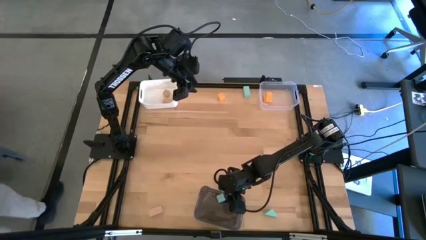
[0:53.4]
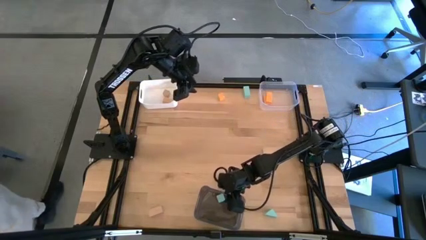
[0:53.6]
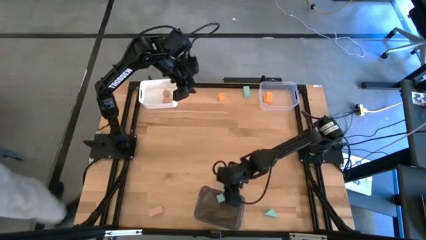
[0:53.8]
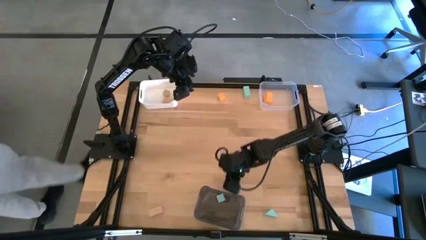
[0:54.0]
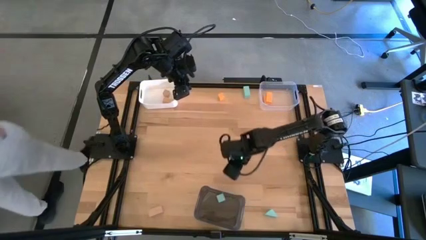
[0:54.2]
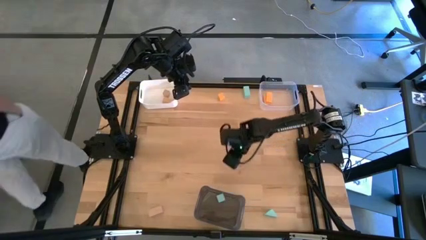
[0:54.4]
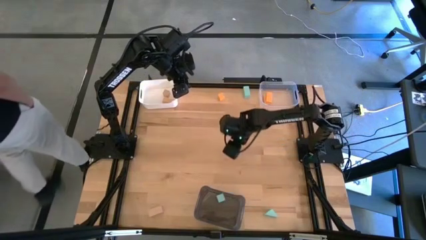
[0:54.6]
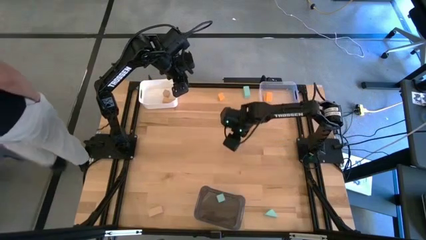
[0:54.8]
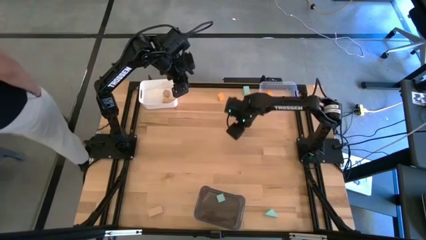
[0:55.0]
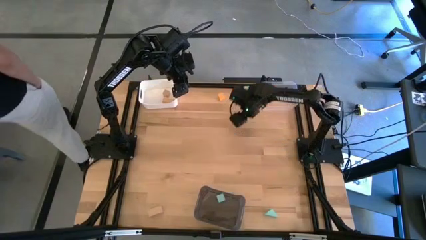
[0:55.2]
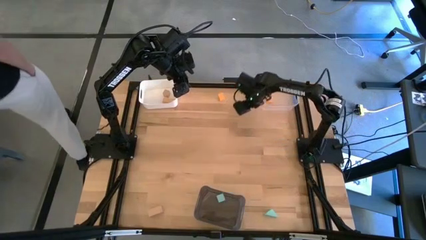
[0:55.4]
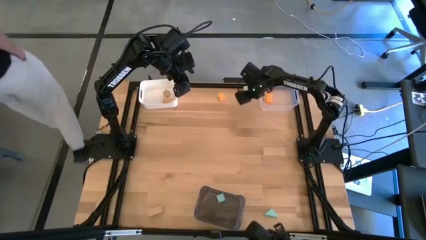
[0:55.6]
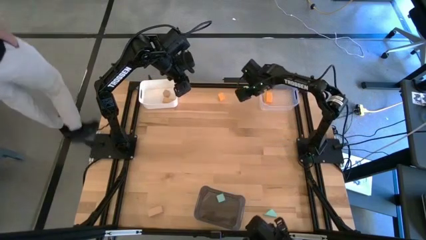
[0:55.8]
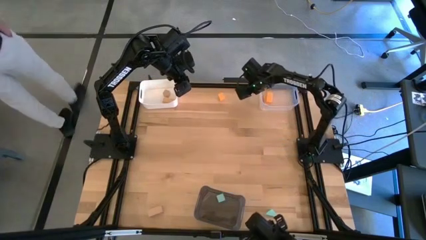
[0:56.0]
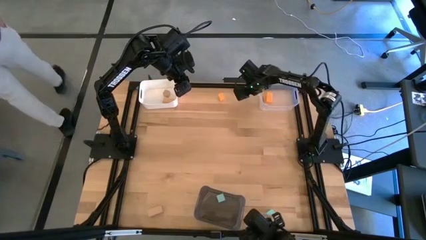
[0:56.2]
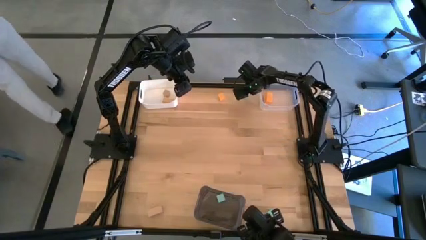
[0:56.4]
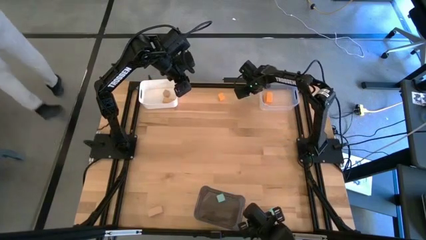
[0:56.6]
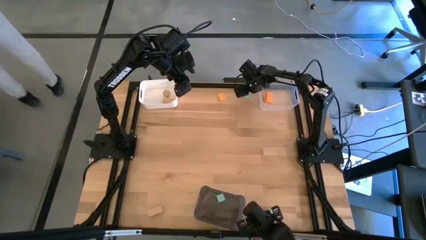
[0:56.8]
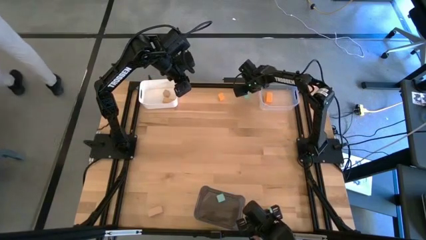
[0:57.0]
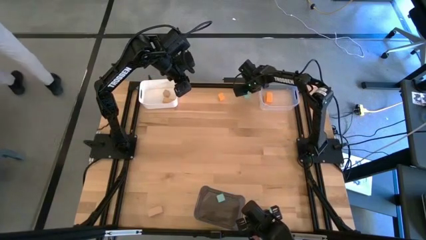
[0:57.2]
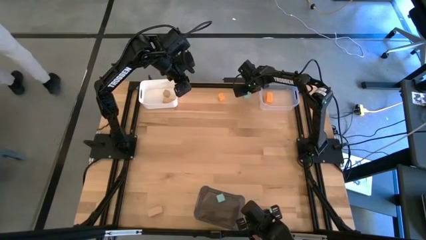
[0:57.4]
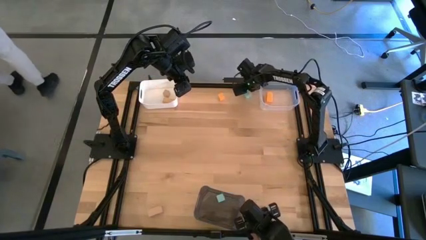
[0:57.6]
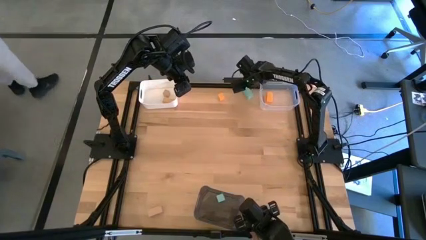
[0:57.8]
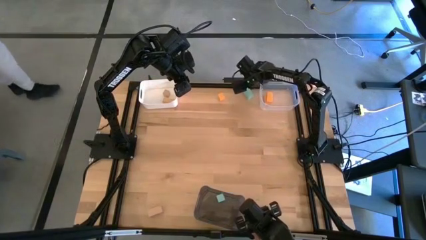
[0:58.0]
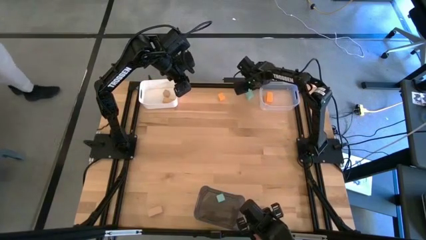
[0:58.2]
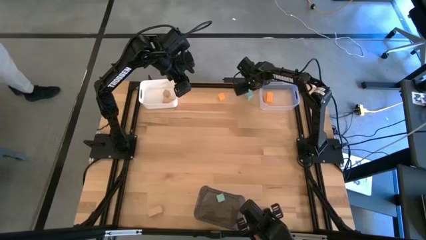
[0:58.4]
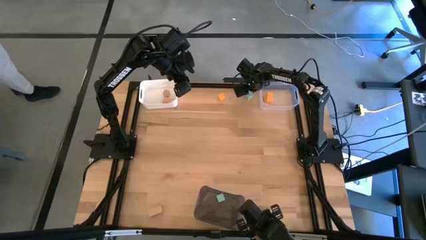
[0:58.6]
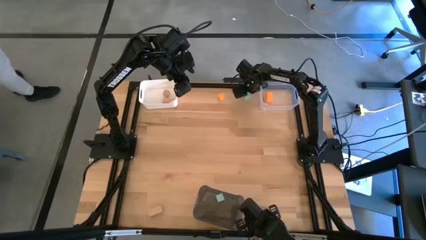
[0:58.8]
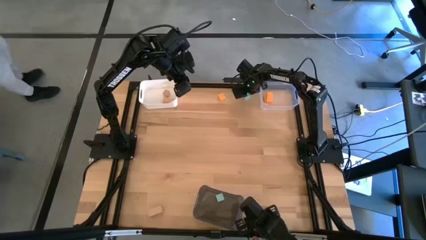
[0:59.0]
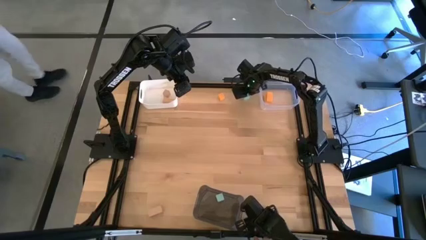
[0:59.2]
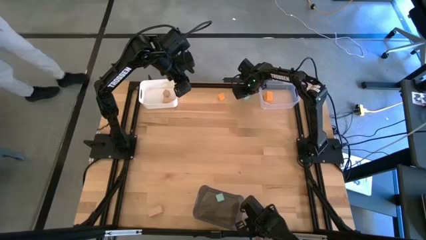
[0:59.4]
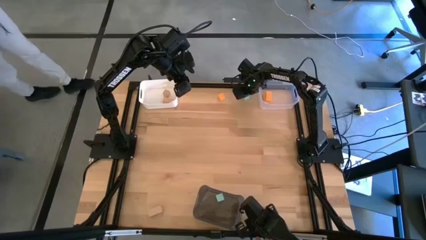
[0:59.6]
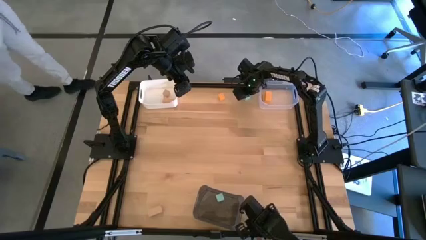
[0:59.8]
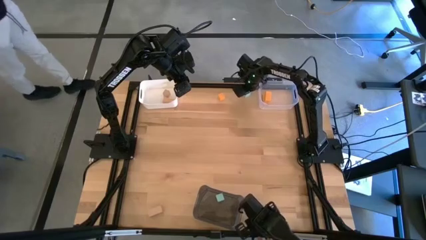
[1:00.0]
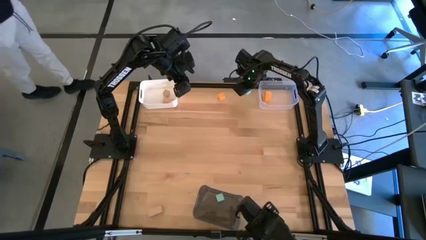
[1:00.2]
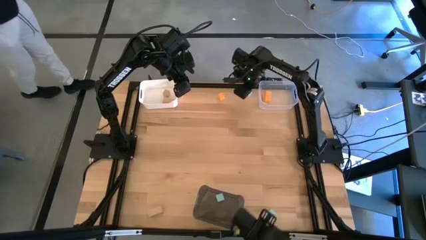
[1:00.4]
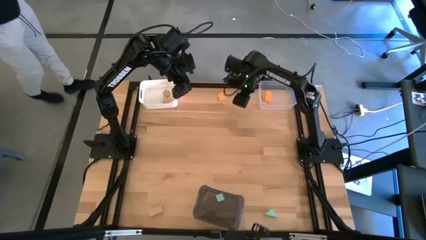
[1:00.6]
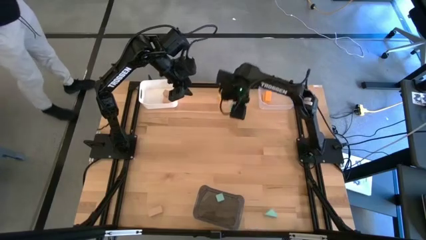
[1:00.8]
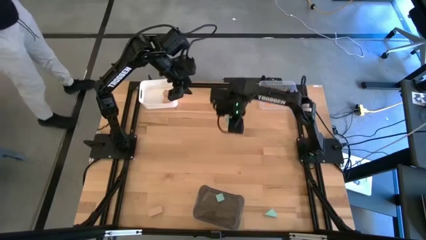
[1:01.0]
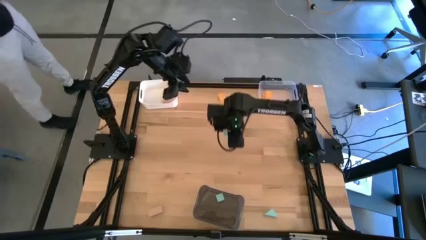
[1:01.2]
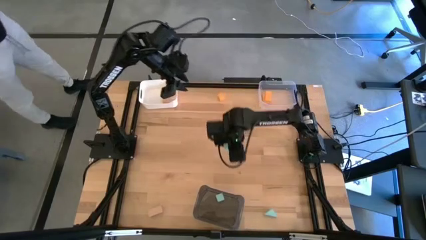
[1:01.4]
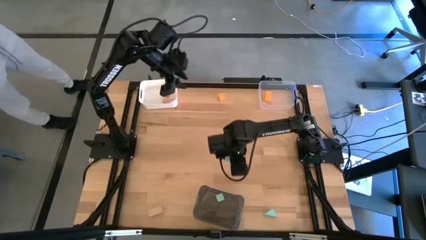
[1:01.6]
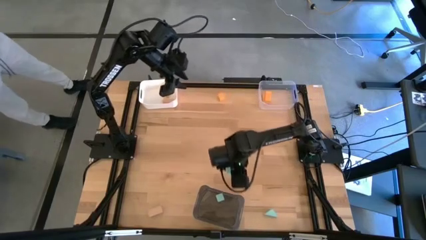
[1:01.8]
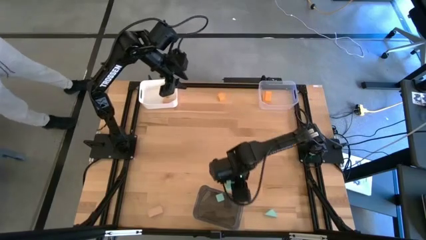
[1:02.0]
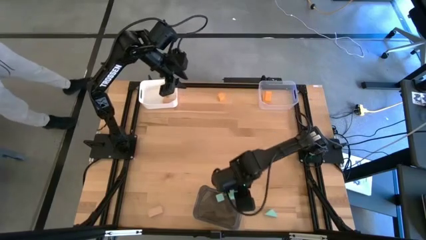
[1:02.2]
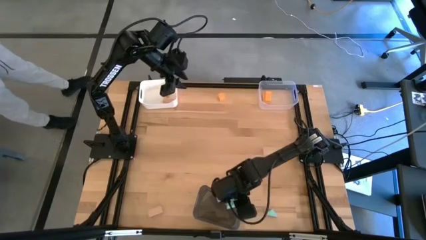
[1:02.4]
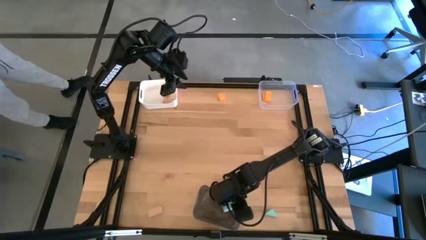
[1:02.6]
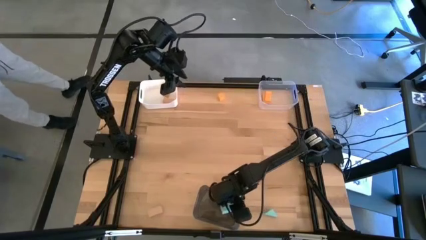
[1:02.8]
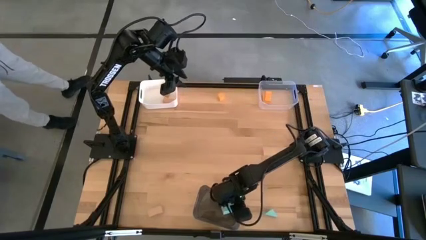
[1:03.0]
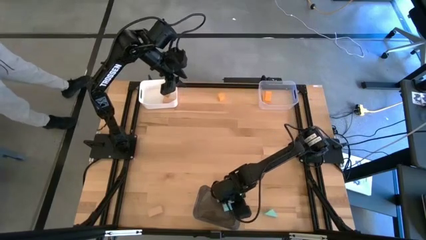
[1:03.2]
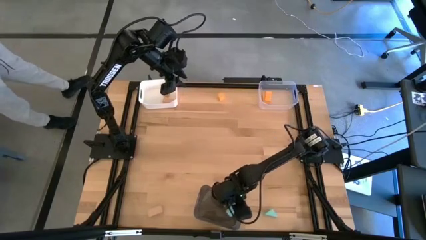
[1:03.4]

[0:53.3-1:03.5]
Task: Sort & place blocks by color
Put the top blue block into the black bin

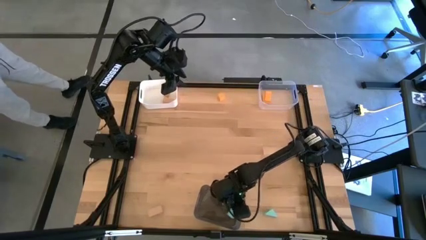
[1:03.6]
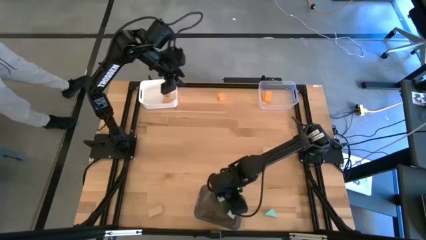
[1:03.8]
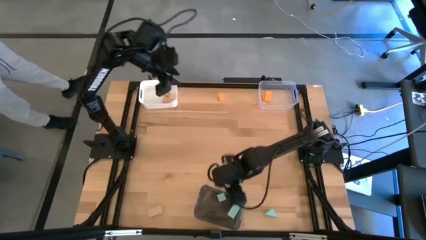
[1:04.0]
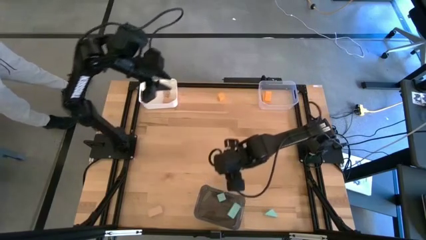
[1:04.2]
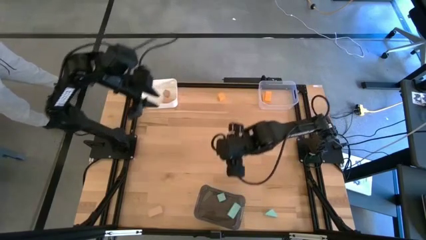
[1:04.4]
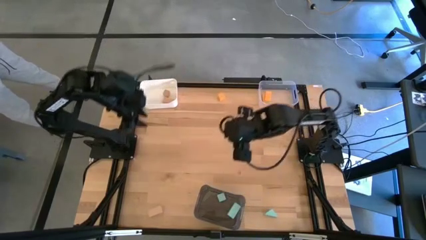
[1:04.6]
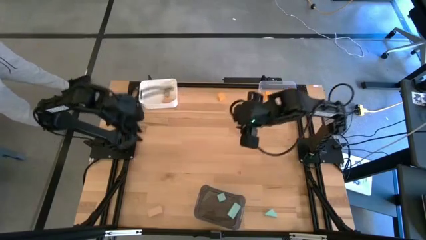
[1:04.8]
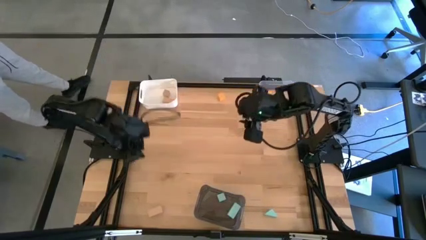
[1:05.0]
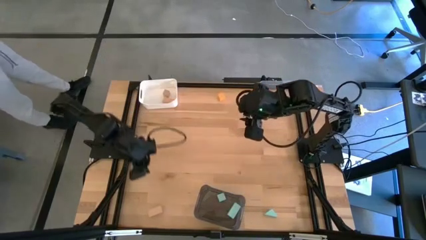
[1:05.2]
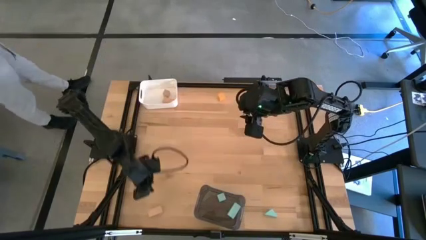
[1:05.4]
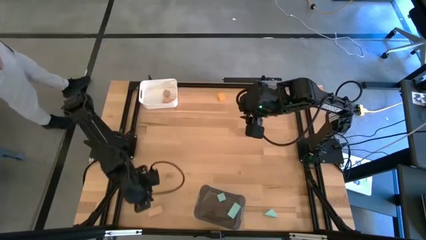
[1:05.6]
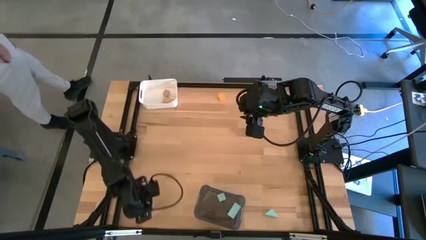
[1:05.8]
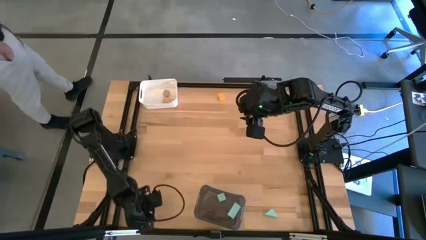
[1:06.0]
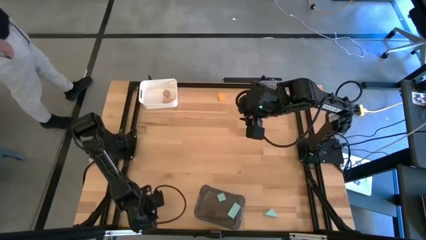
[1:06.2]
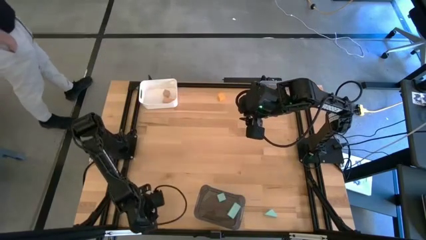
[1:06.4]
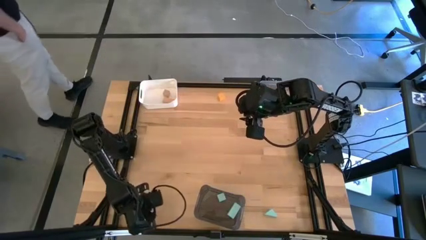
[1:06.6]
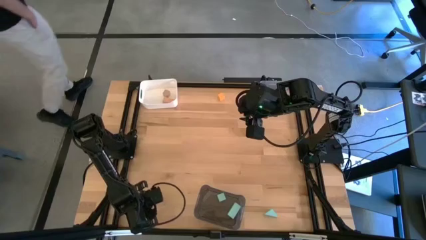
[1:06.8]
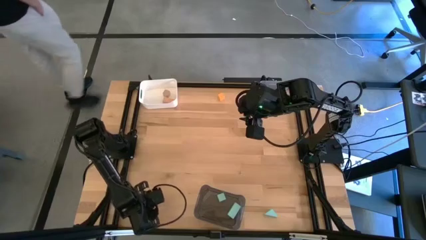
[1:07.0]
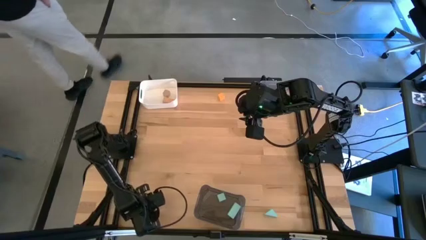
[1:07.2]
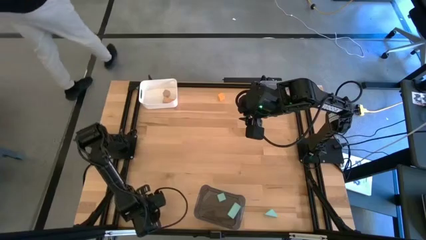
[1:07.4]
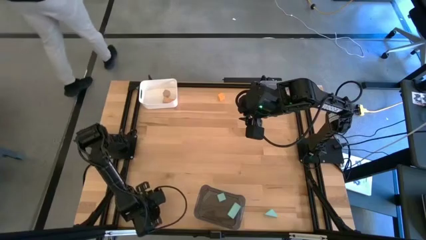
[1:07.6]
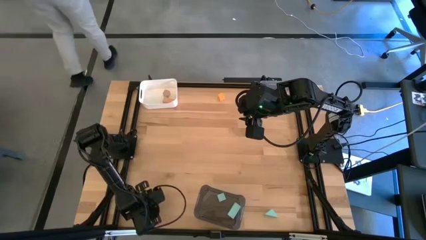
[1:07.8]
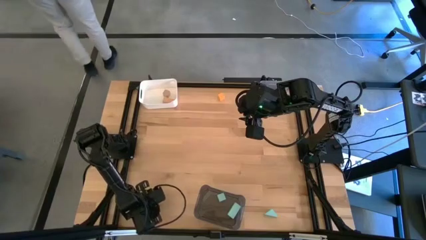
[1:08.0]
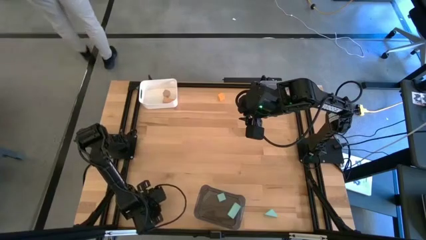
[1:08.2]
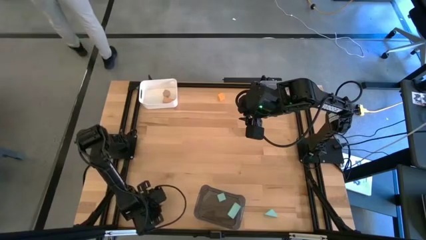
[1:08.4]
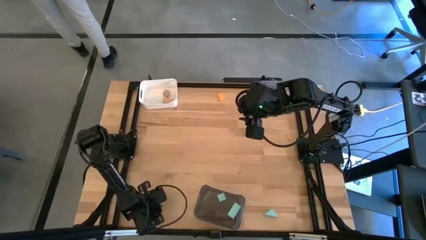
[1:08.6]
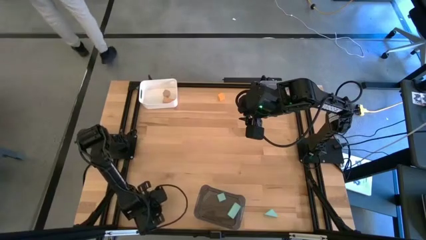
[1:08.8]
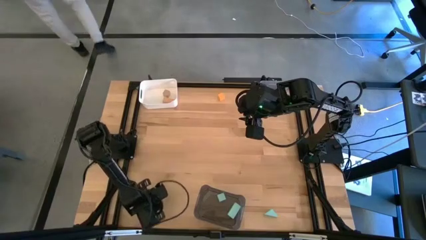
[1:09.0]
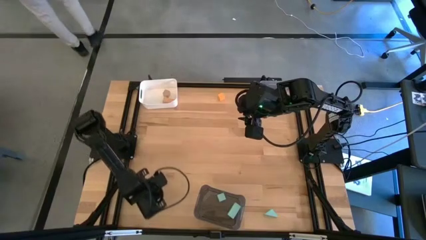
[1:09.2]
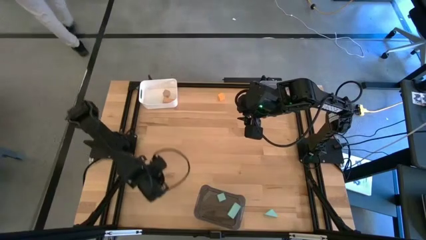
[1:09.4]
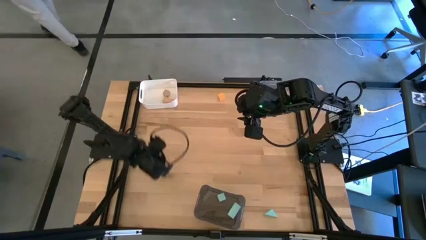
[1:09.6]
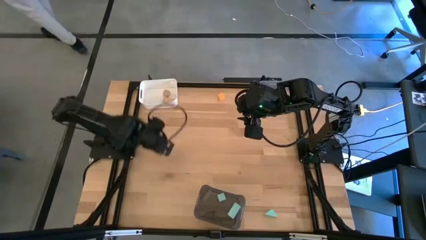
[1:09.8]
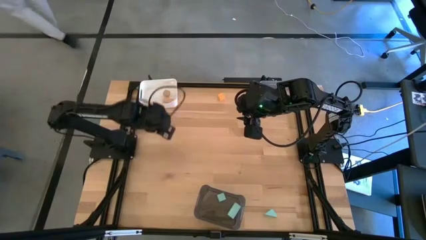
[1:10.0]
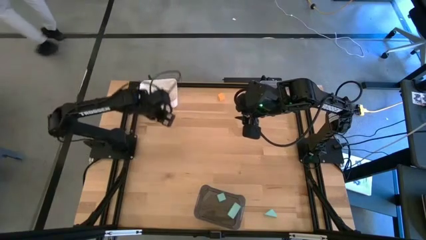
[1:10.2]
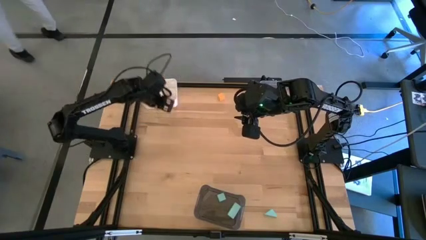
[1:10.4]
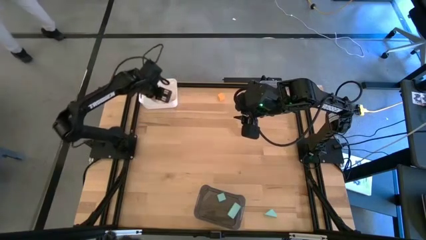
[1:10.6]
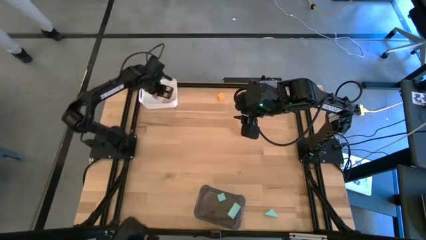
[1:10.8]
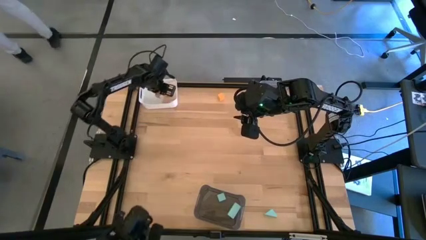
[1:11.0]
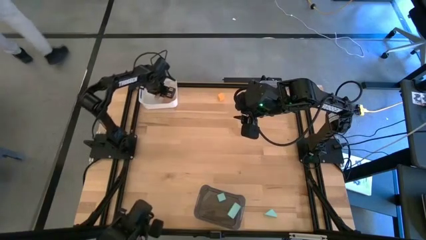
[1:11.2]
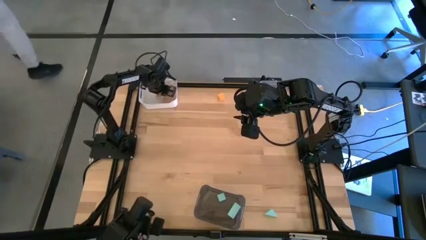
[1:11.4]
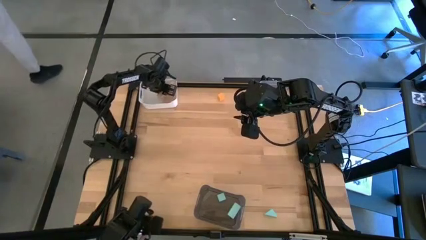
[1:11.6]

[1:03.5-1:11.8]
Put the brown block into the white bin
